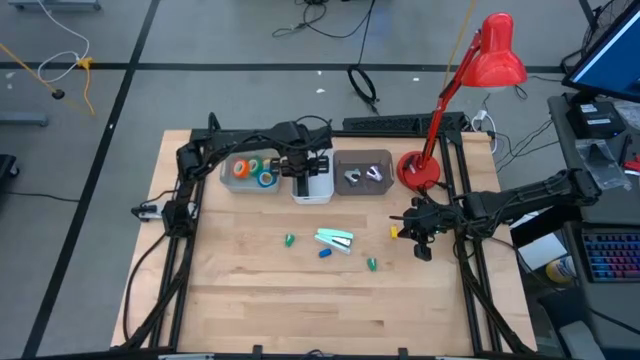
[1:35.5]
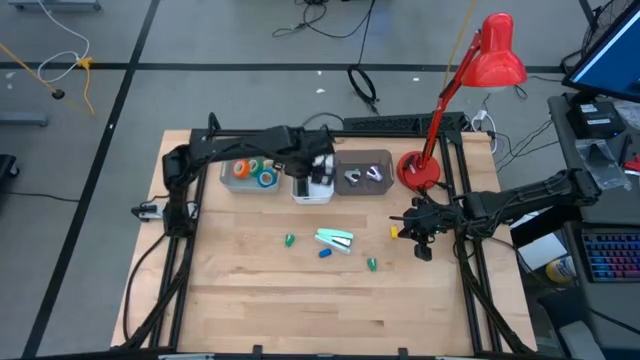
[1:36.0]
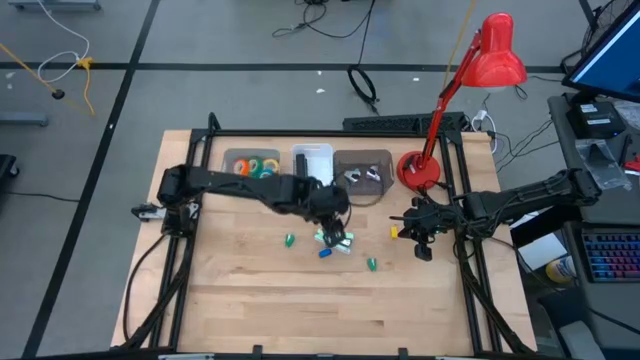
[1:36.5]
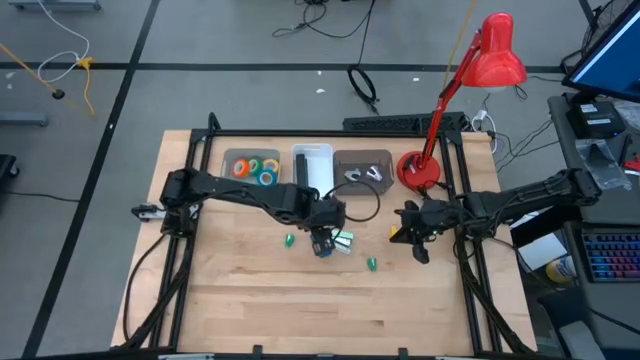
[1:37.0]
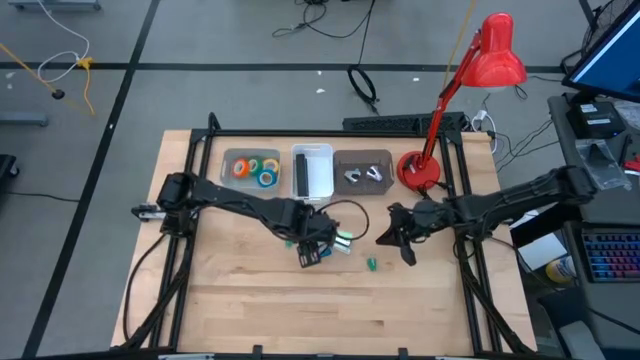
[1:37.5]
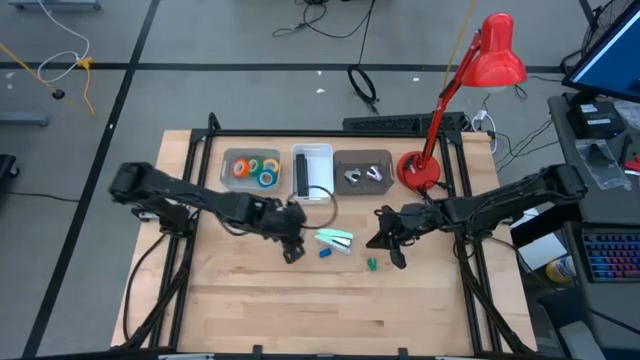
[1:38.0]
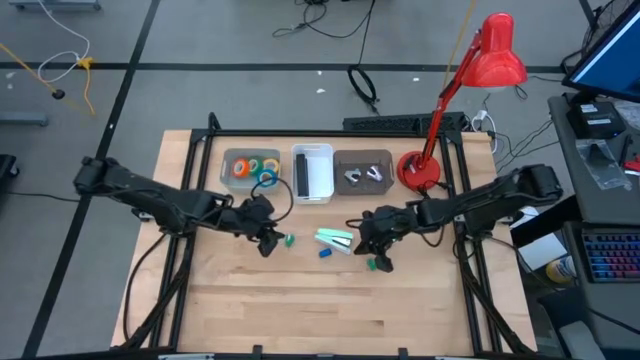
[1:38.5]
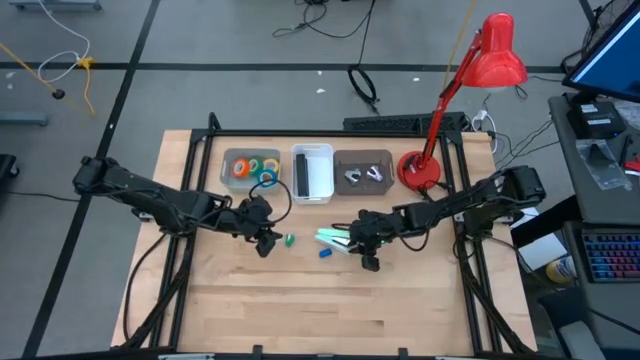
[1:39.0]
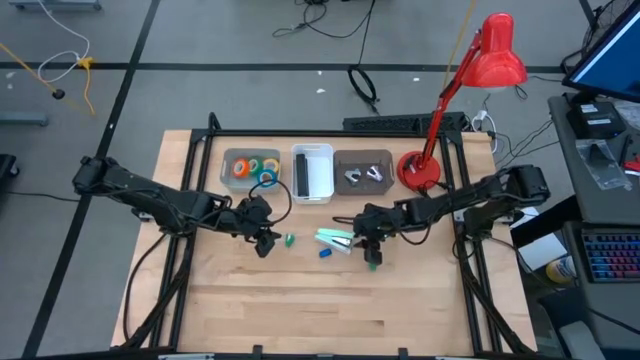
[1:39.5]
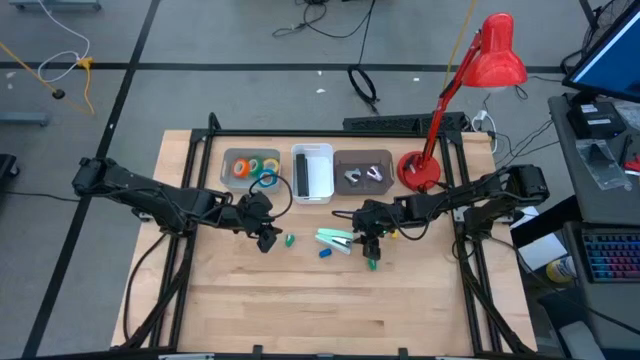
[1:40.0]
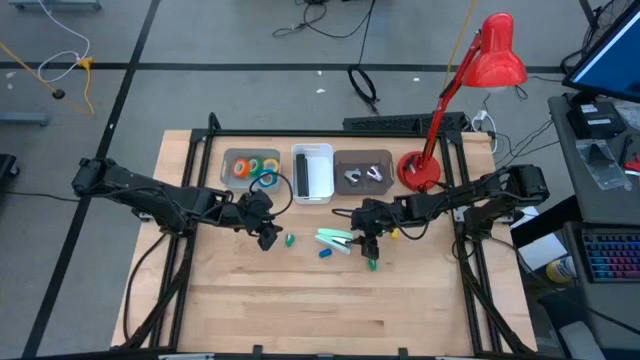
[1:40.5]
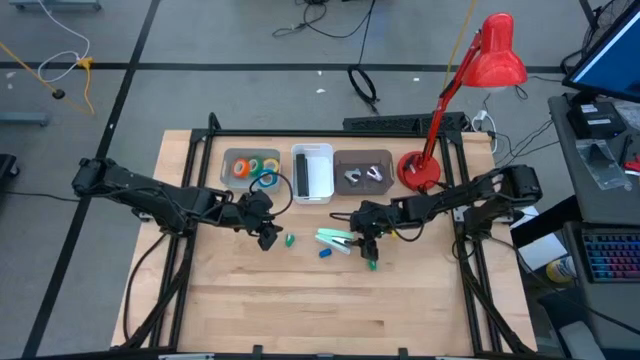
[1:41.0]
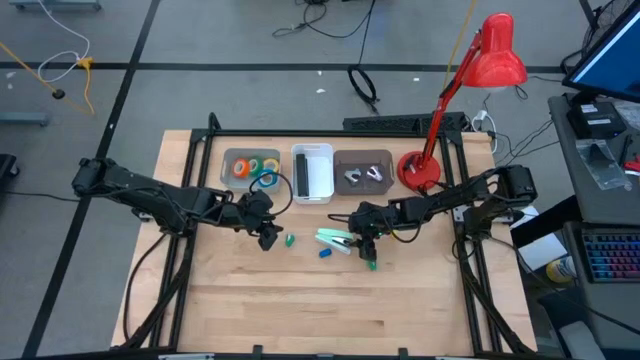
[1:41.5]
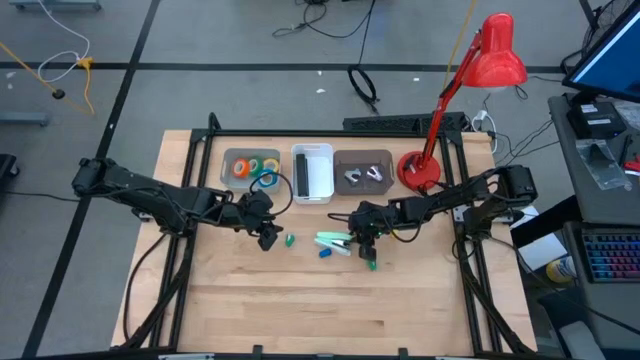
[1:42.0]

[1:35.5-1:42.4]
Task: Pick and place Stapler, Stapler remover, tape
Put the green stapler into the white bin

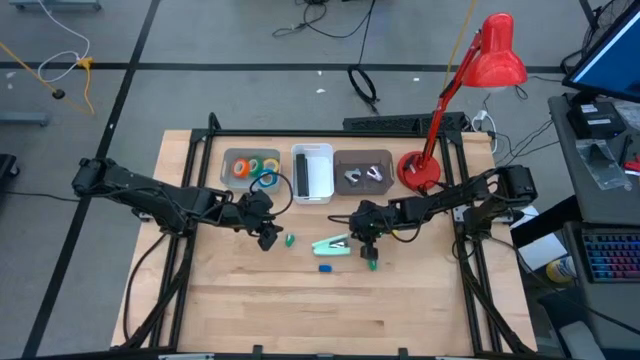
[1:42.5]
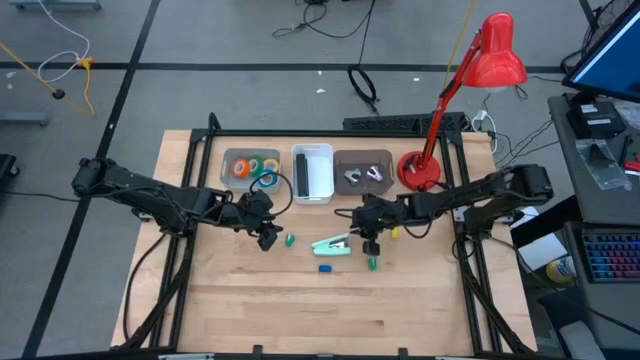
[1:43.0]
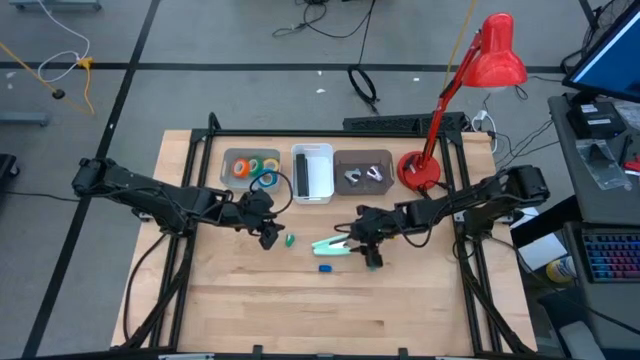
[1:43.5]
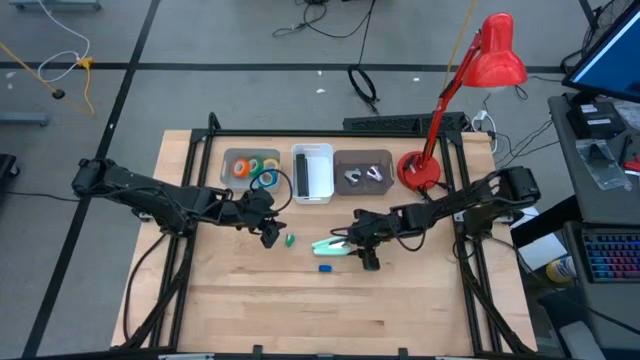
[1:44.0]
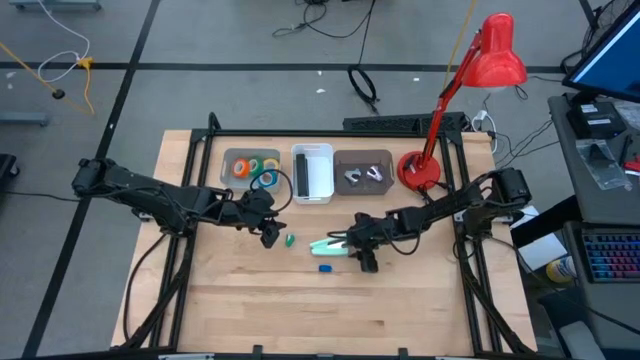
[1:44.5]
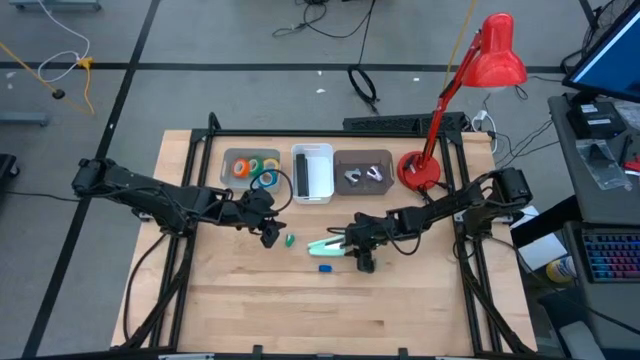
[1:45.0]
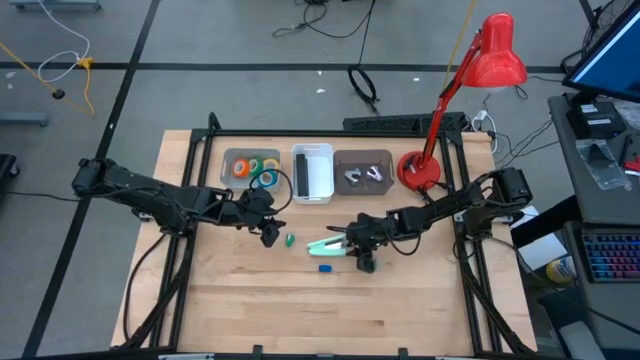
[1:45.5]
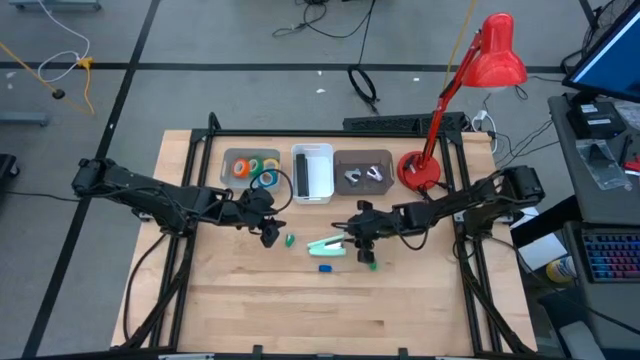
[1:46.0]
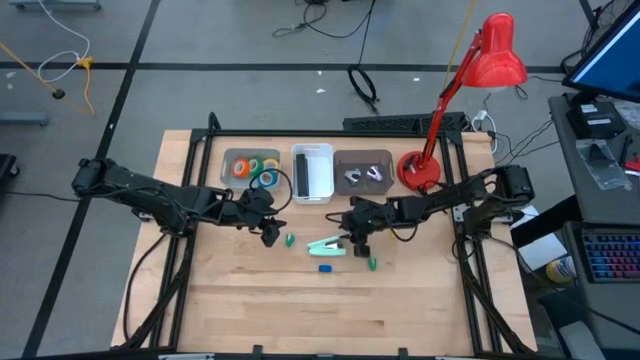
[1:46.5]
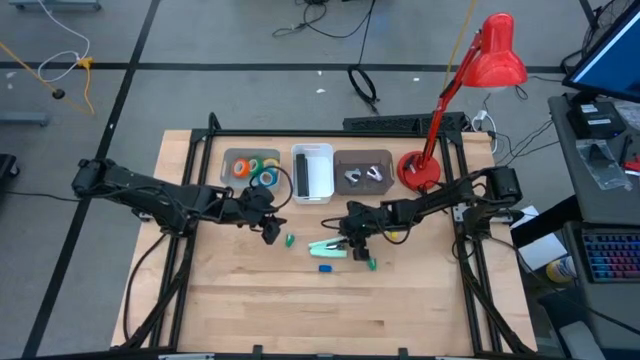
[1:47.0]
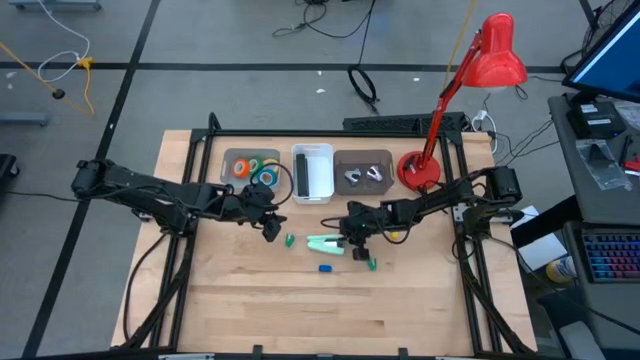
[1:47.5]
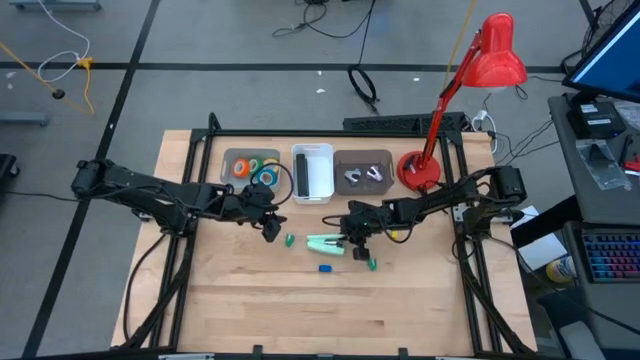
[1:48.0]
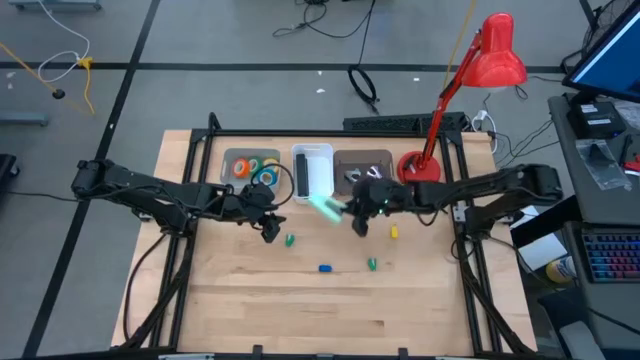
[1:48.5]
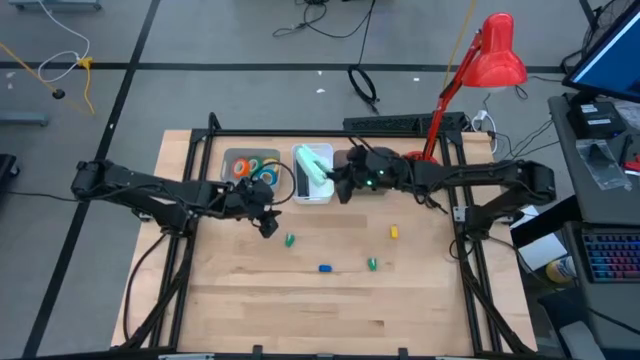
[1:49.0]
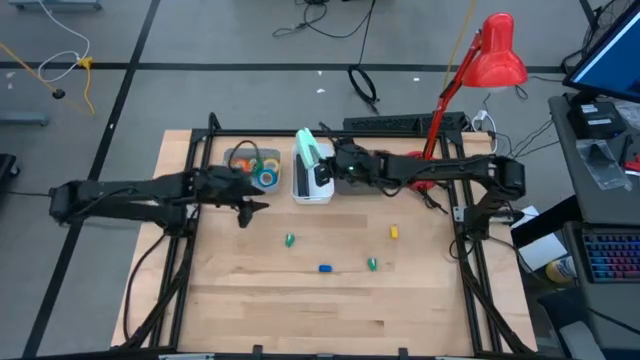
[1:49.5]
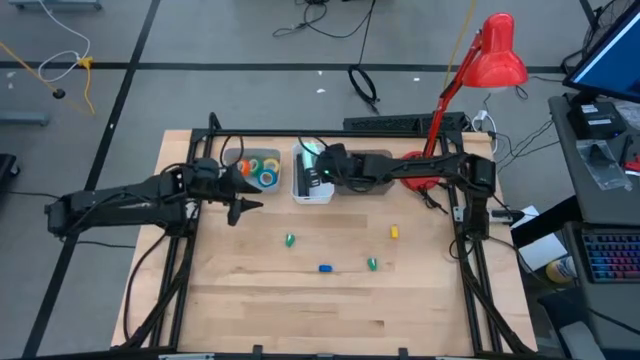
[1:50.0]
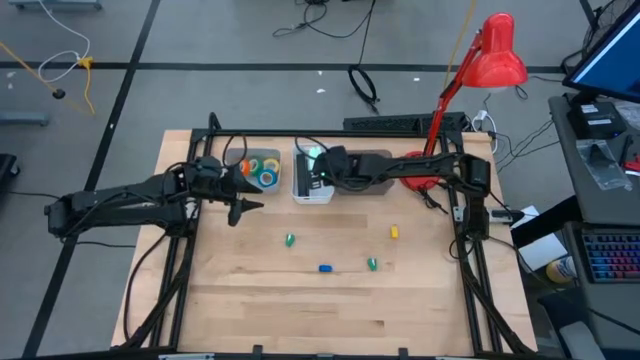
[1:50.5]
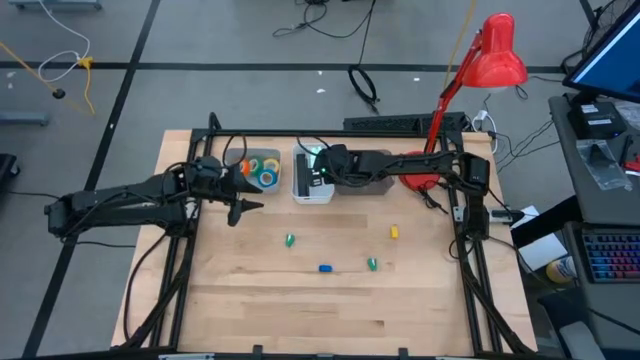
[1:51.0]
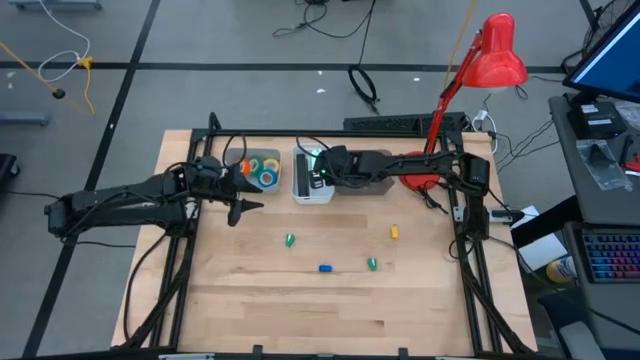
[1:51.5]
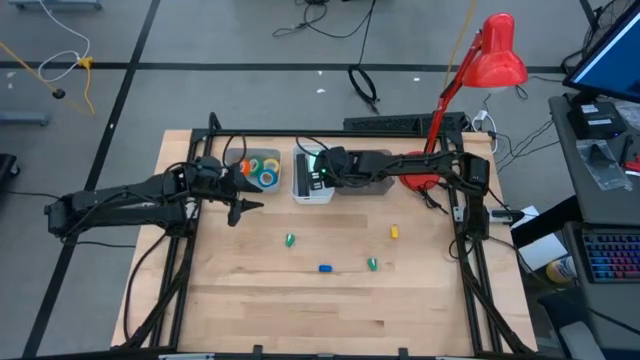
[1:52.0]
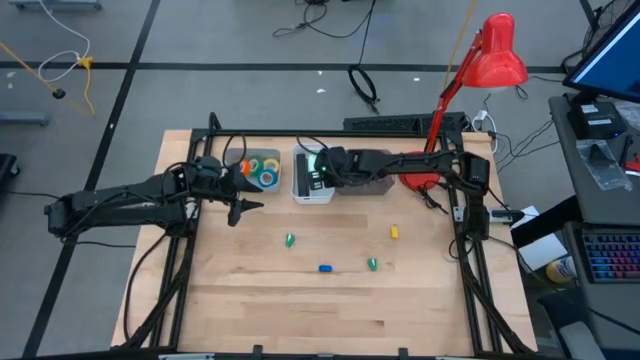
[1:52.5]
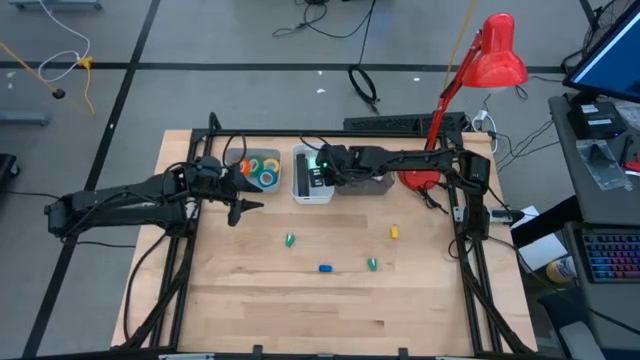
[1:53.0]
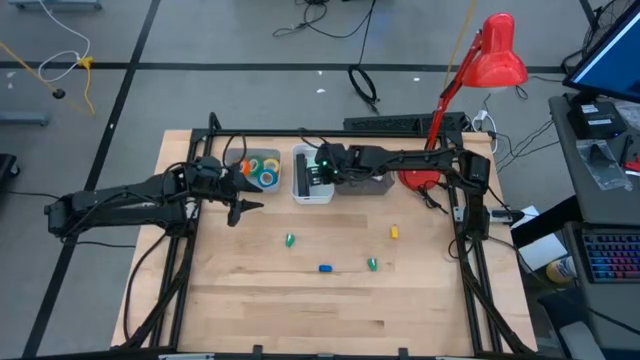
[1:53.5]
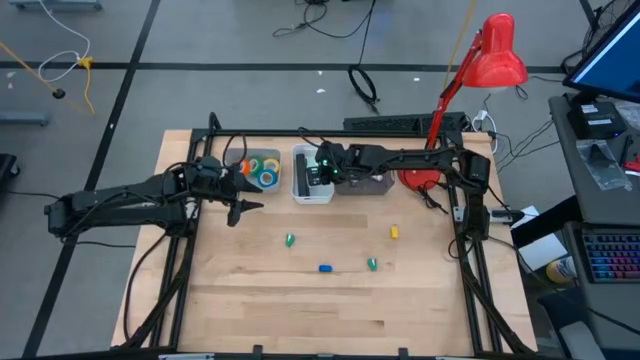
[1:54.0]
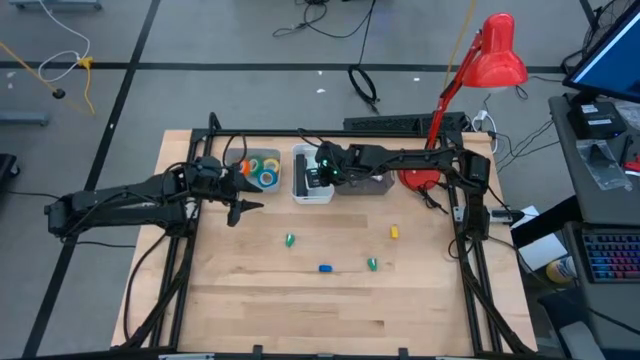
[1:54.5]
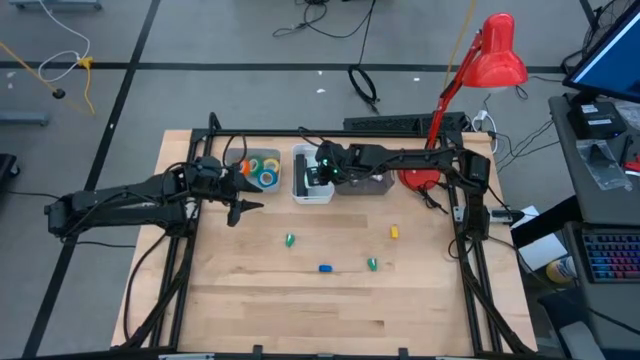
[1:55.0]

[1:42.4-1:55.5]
Put the green stapler into the white bin

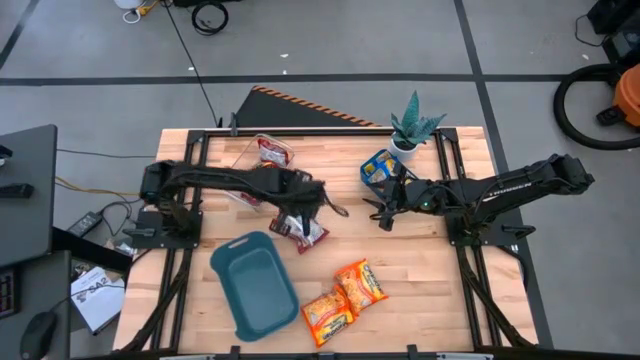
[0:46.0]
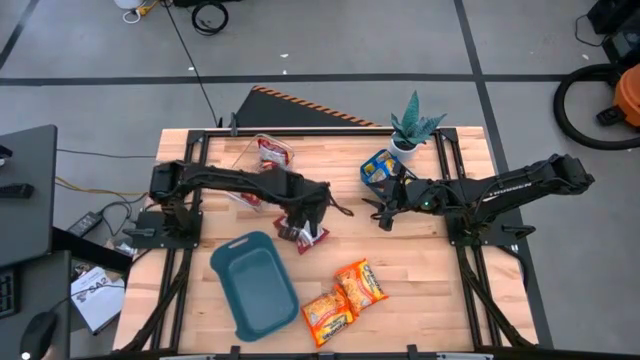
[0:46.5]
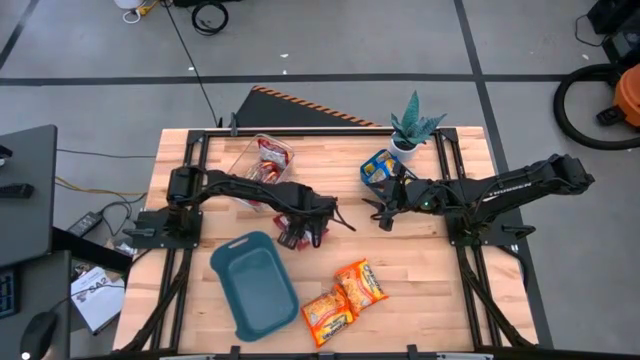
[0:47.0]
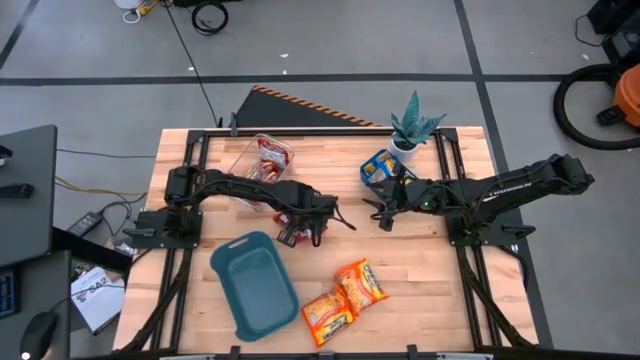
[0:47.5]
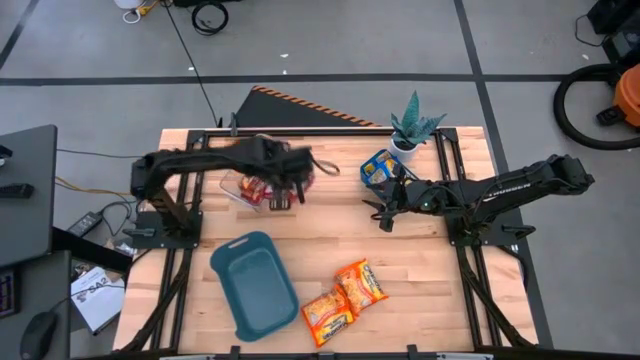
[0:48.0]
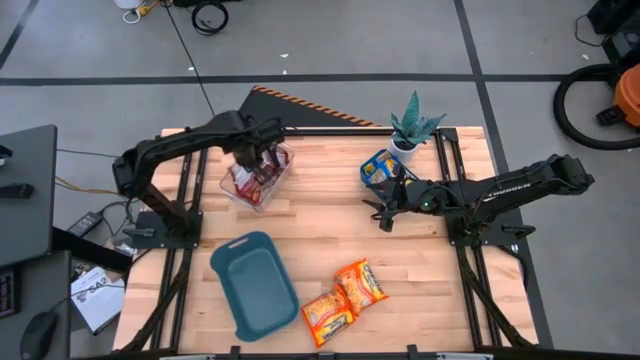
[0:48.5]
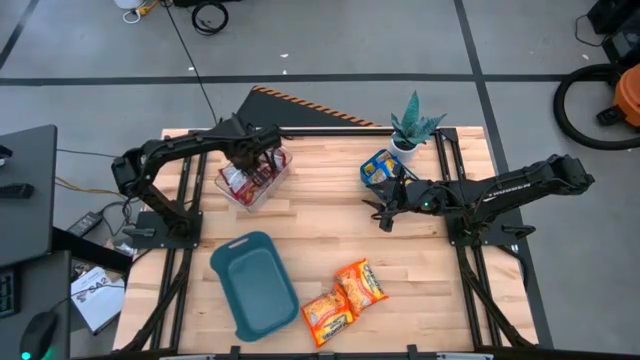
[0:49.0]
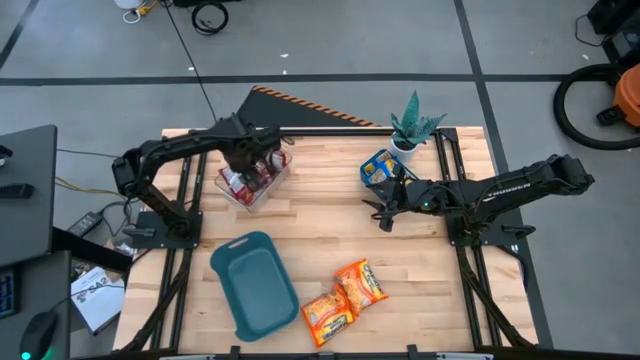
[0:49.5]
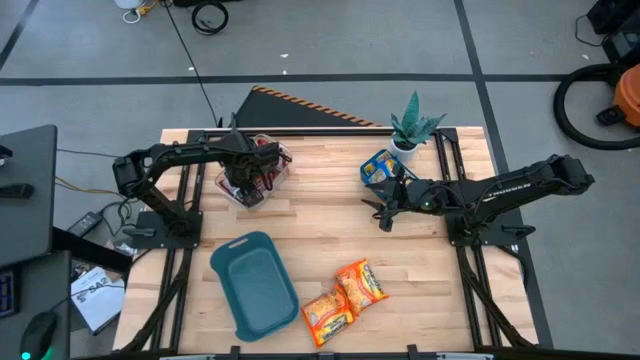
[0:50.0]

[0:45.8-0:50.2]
Task: Sort Maruchan noodles
Put the red noodle pack into the transparent bin
